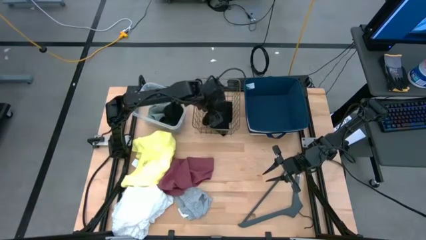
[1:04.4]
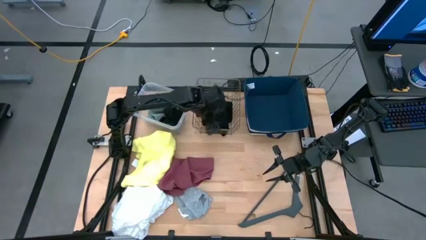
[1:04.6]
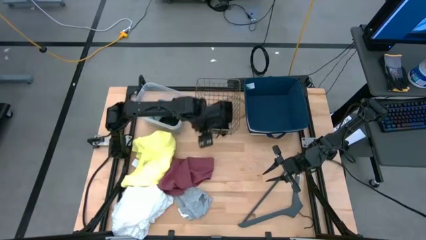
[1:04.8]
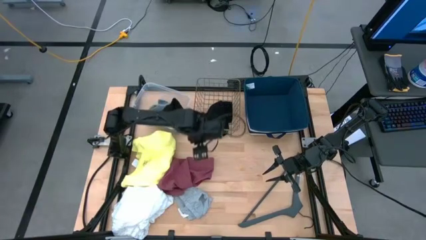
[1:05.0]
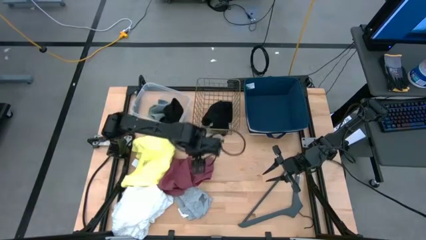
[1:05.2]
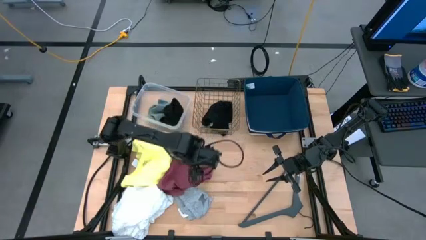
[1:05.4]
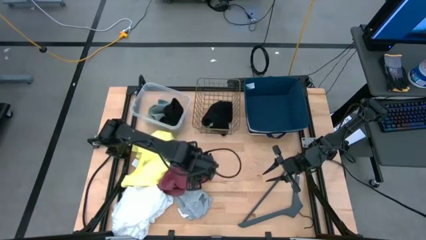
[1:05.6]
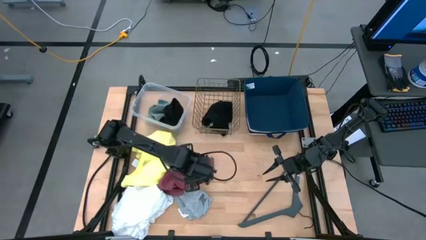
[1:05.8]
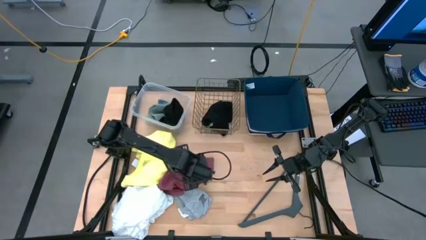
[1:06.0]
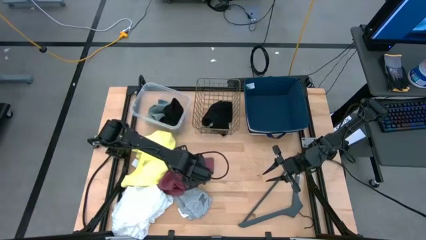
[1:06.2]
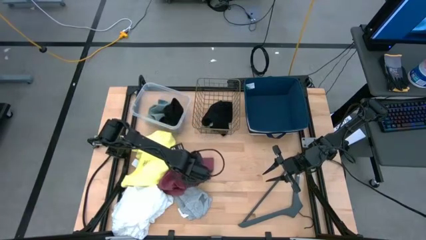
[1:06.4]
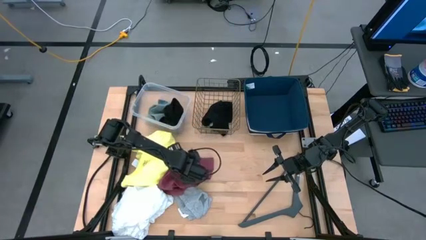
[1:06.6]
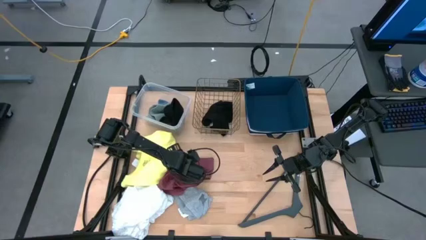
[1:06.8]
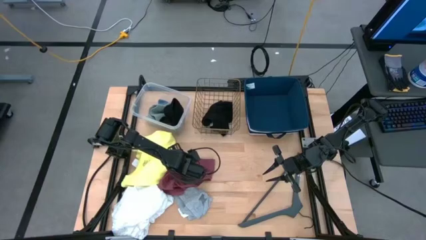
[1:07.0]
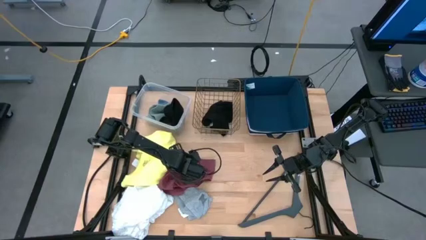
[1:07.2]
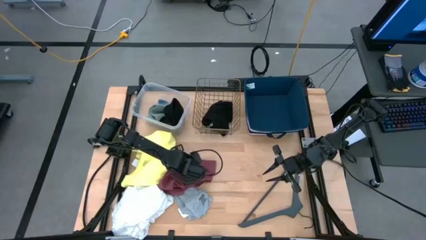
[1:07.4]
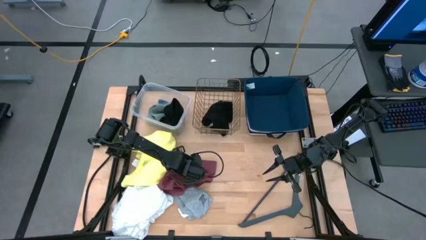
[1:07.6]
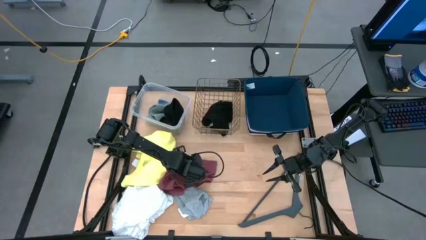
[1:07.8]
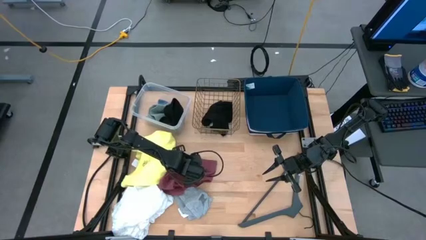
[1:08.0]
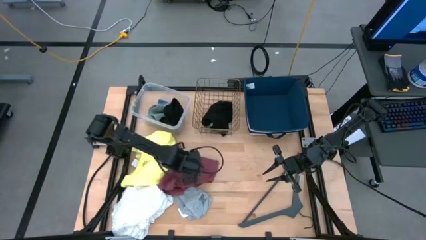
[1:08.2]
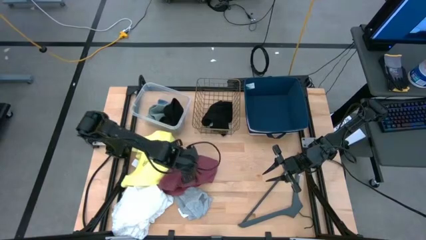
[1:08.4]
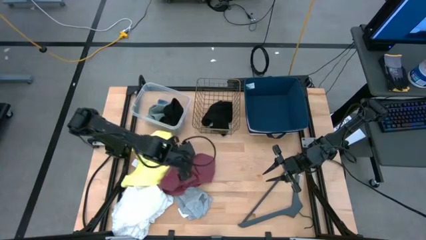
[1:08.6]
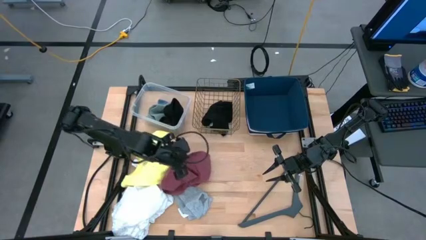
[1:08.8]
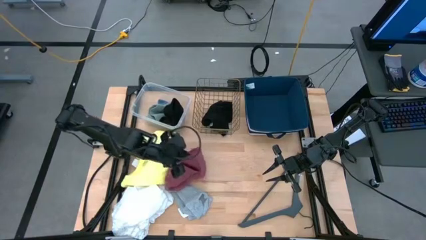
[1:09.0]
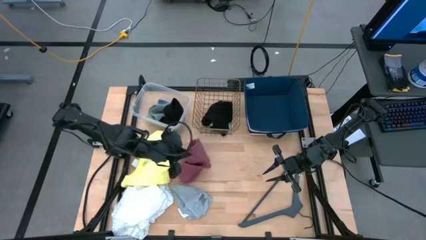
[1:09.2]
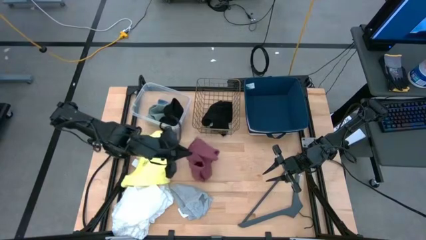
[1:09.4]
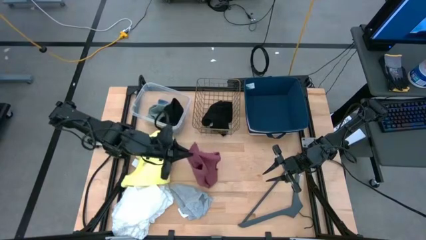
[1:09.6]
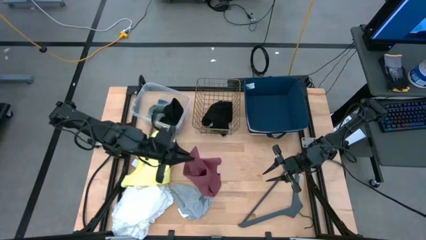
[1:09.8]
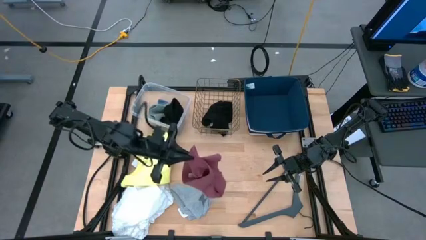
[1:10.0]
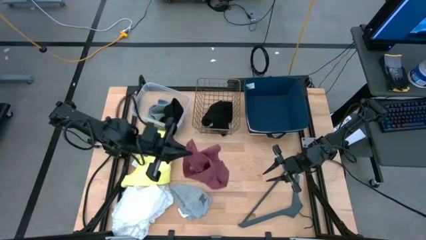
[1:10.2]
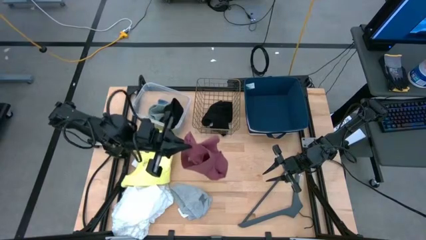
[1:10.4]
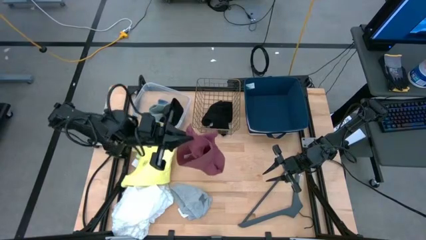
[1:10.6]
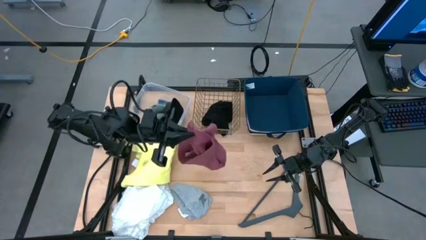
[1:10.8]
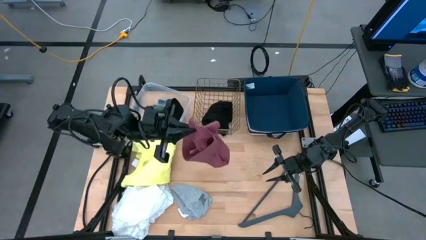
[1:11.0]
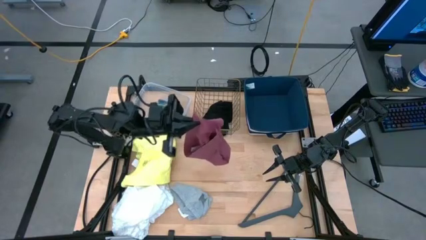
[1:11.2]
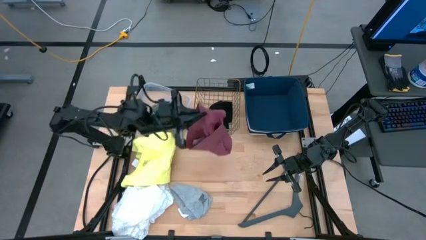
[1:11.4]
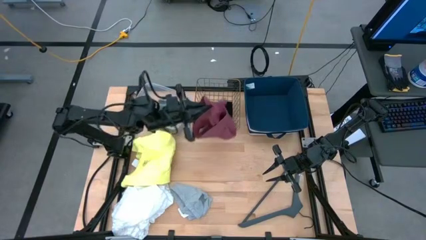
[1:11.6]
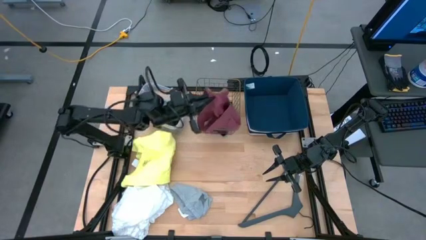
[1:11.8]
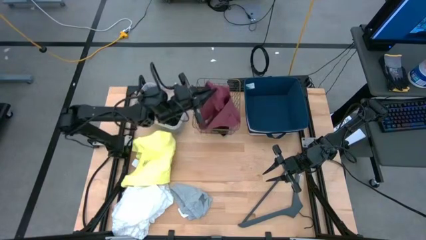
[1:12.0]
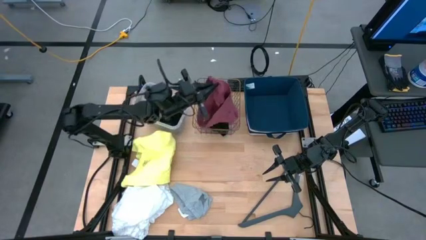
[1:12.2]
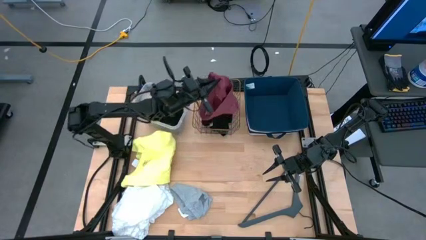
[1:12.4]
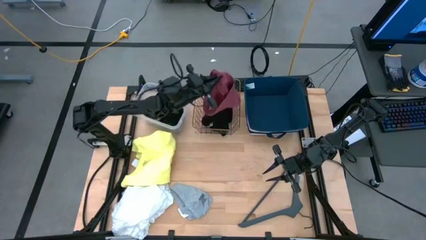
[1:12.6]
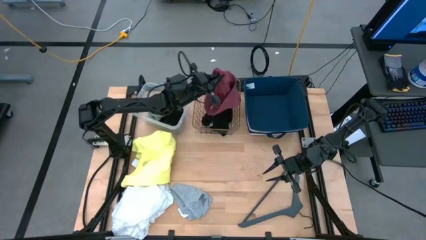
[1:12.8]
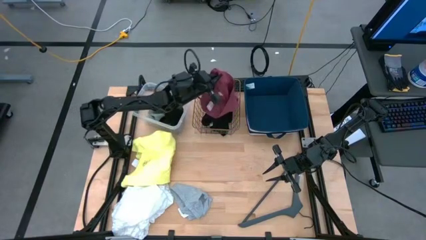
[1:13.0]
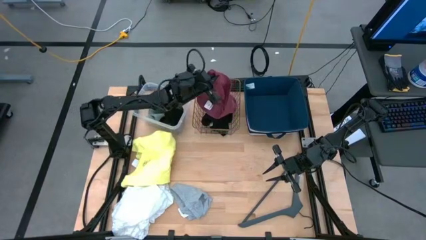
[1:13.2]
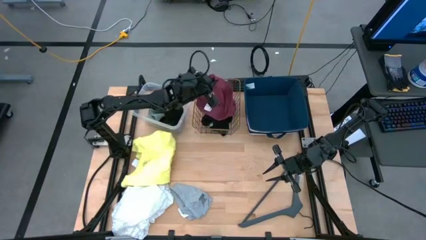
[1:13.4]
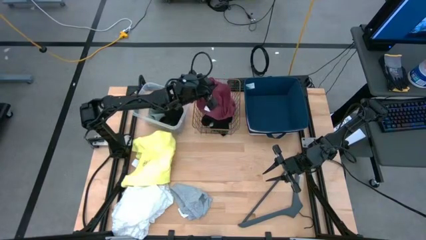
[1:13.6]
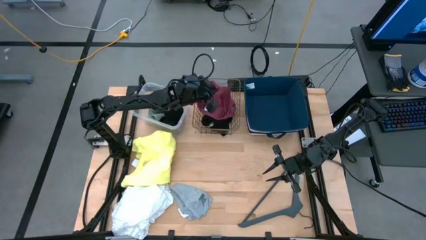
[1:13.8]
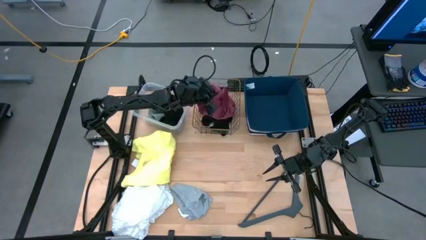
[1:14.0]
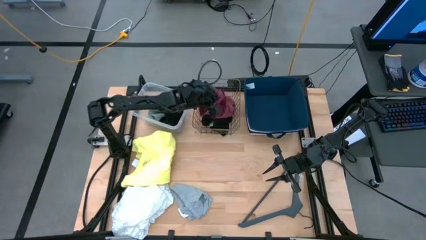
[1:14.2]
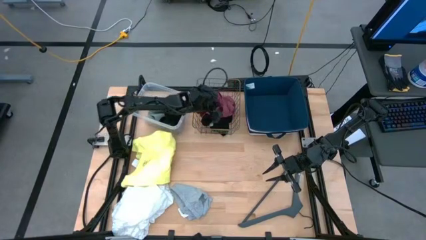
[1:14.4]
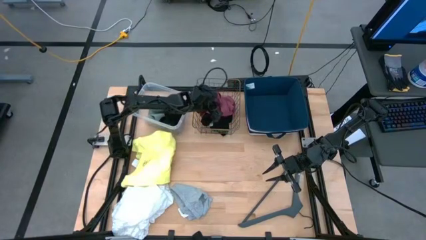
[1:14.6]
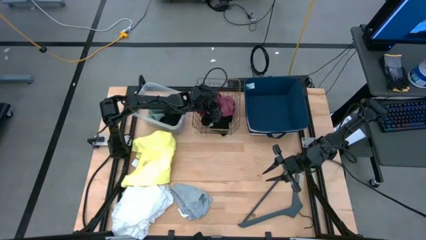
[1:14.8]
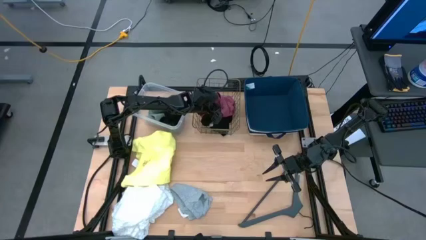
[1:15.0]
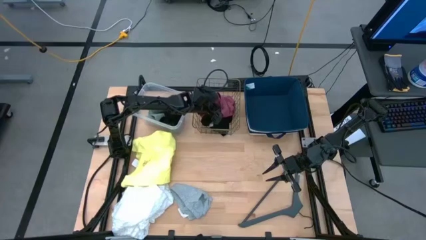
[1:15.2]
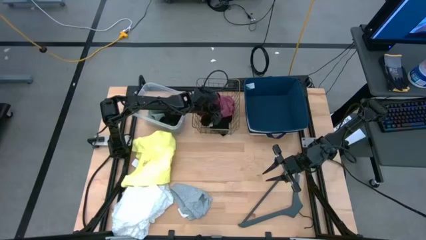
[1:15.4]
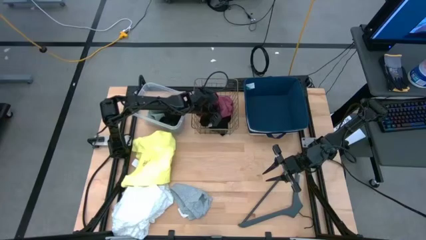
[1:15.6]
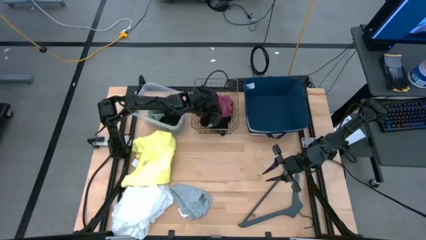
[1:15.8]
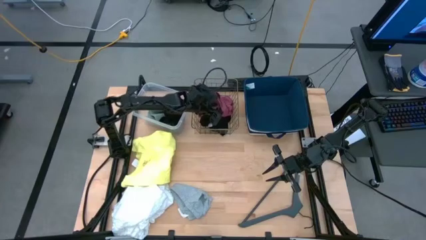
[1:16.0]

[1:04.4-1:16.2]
Task: Pick & Place Cloths
Put the red underwear into the wire basket

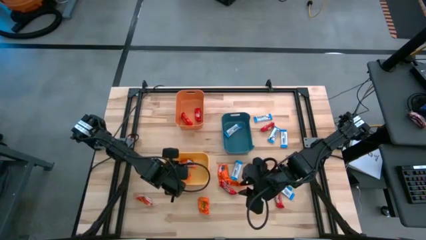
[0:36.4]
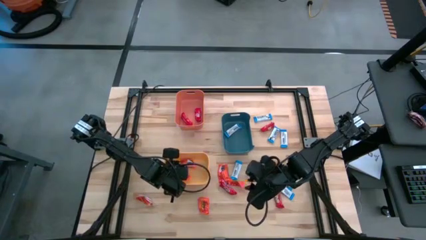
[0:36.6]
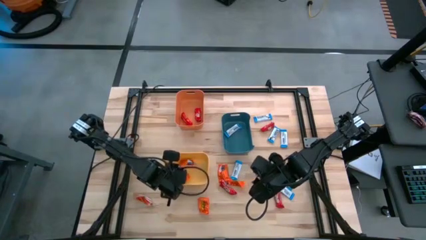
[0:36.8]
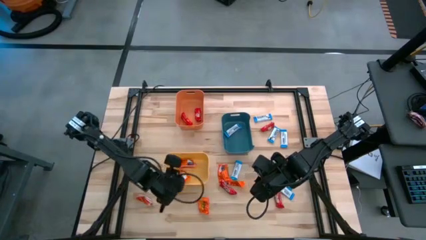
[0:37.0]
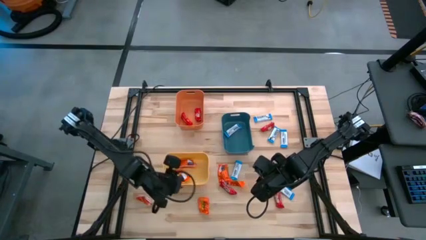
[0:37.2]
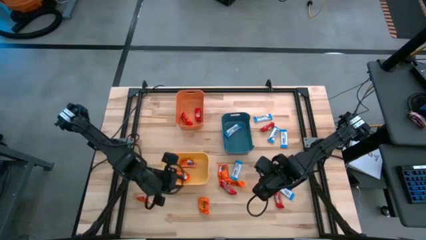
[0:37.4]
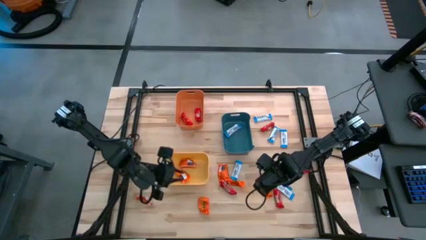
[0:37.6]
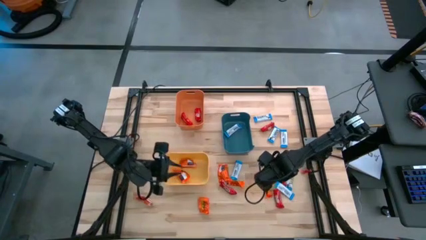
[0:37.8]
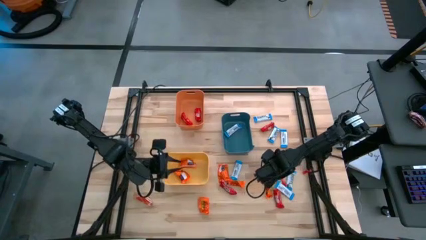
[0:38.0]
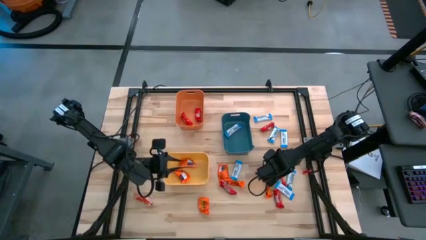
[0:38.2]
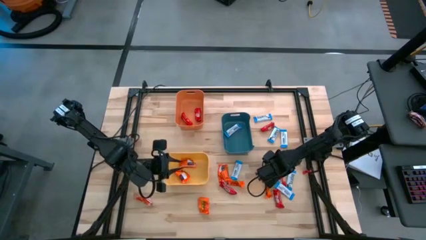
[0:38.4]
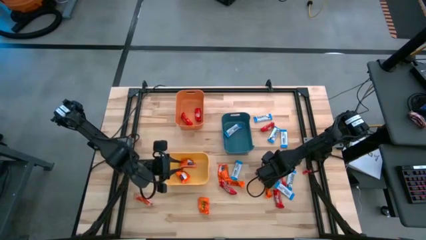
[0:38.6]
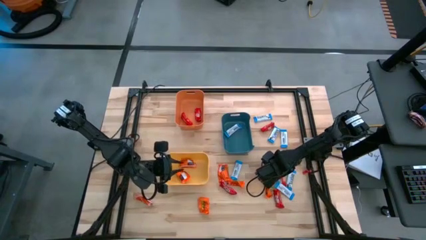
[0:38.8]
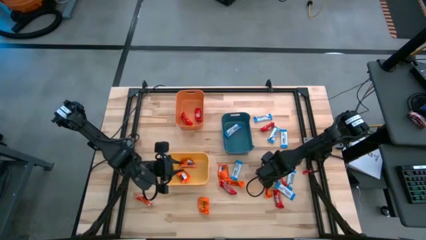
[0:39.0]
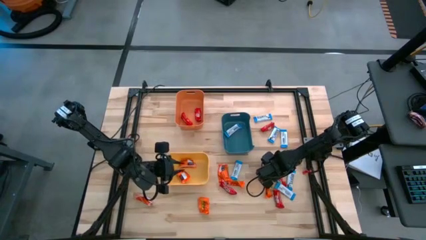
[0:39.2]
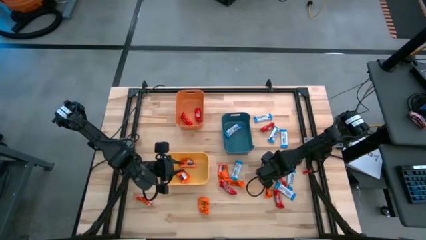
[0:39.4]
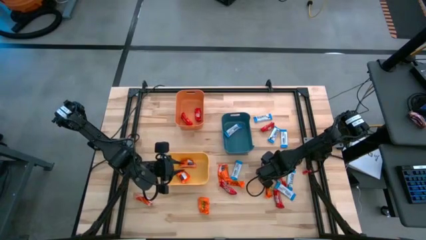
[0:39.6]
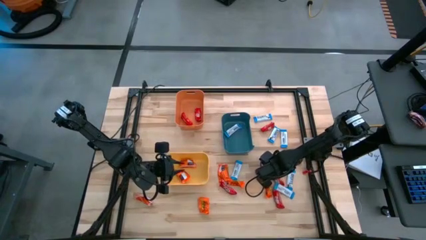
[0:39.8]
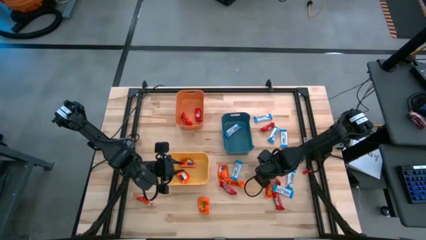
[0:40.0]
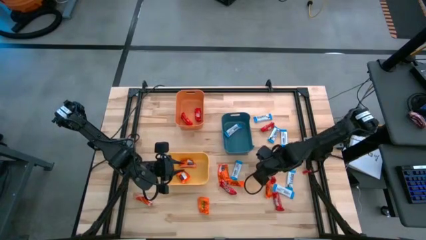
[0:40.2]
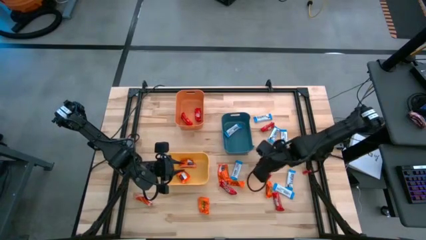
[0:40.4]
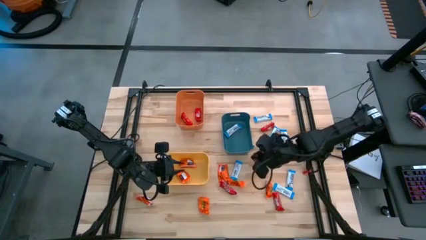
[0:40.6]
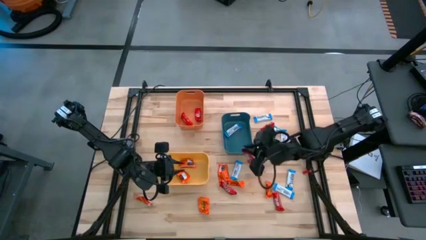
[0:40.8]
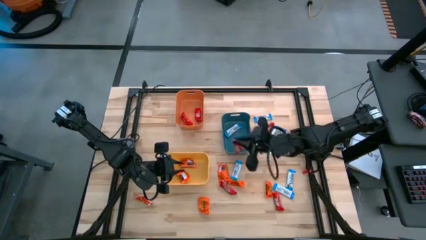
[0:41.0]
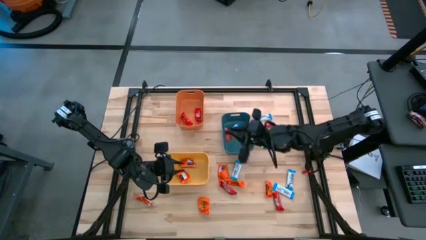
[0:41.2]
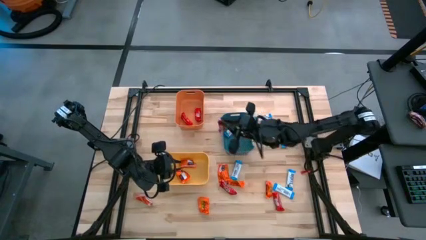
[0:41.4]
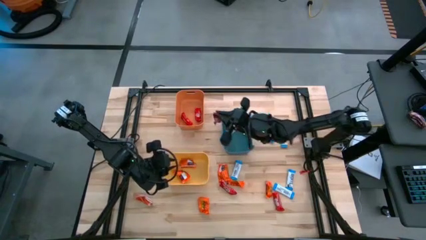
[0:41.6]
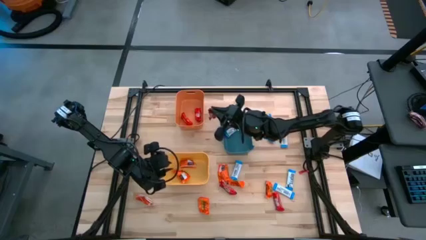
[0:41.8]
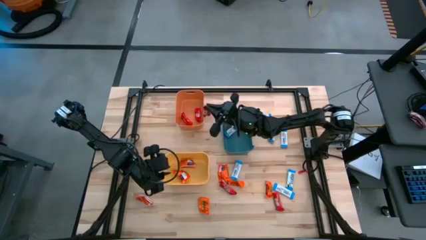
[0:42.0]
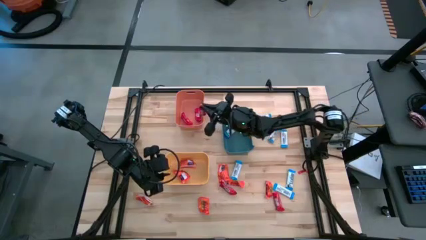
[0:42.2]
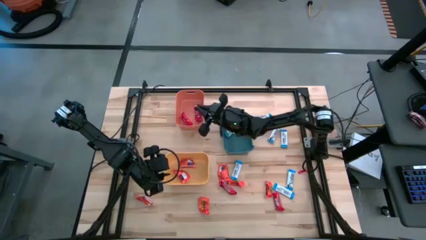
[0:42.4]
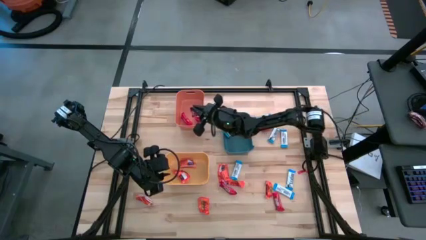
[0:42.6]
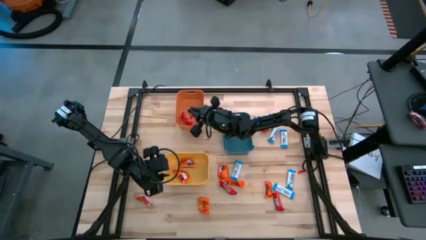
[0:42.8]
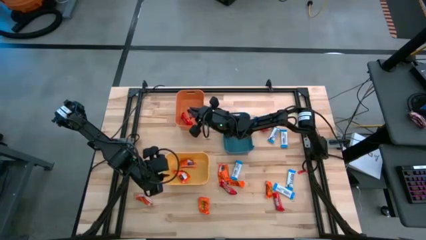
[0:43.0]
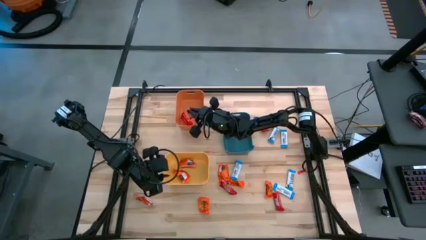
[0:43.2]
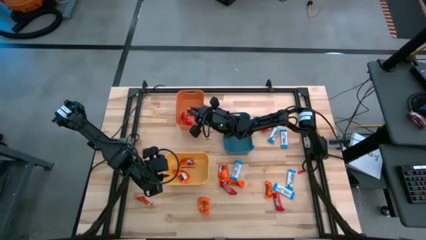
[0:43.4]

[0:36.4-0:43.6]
Task: Organize candy in baskets
Put the red chocolate into the orange bin
